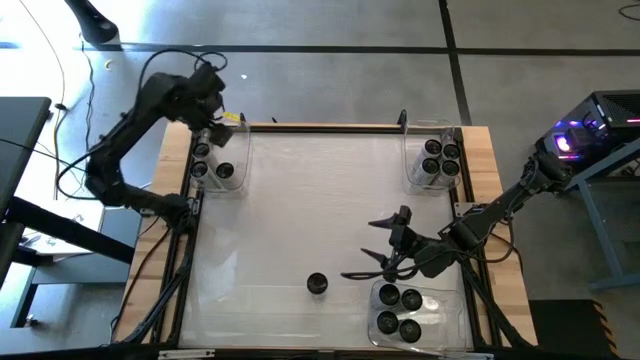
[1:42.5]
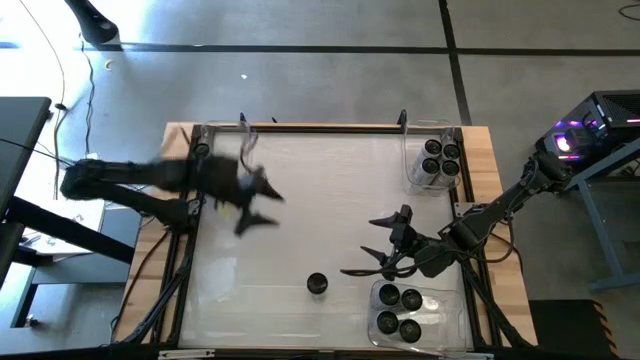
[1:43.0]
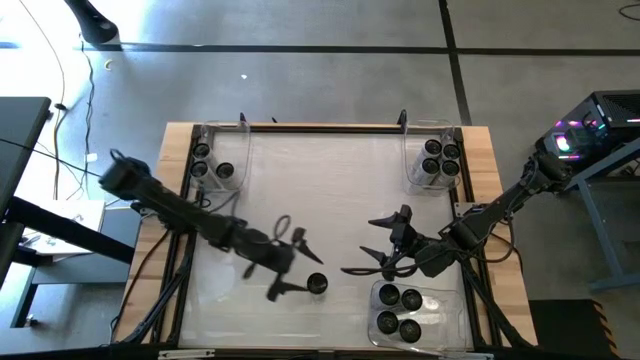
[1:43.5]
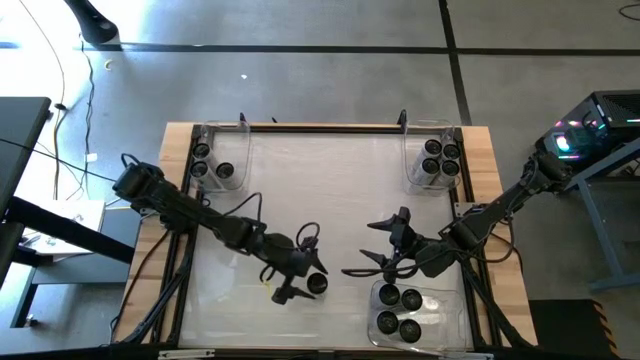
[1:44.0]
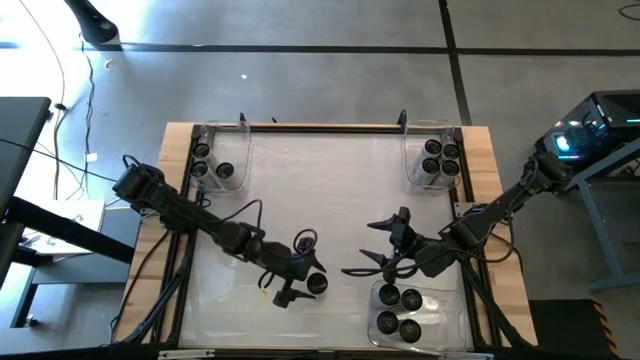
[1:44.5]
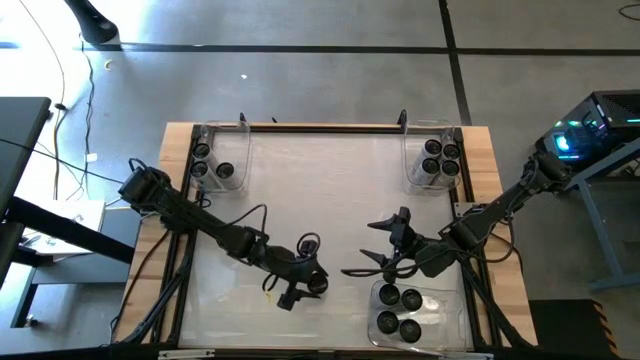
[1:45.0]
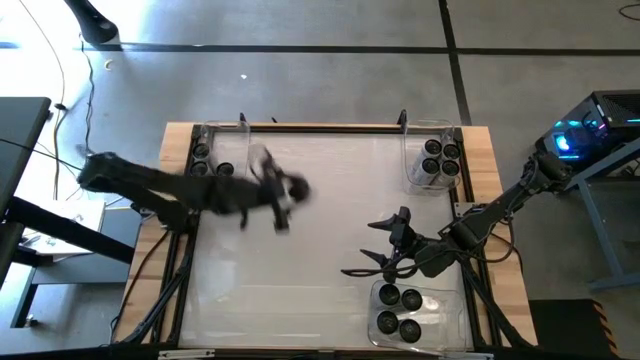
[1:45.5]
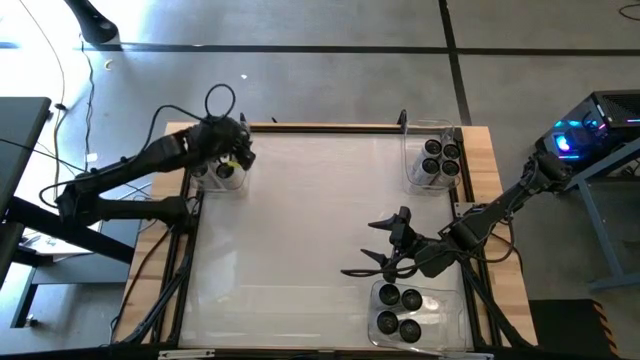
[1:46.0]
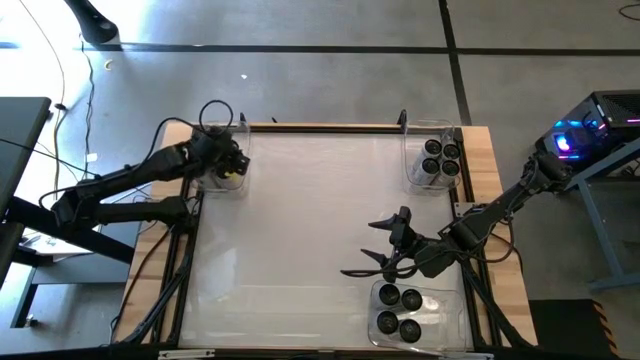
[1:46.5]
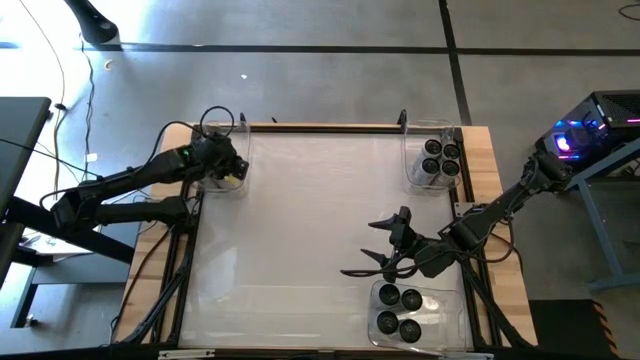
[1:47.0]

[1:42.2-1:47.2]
Task: Sort soda cans
Put the pink soda can into the top left transparent bin

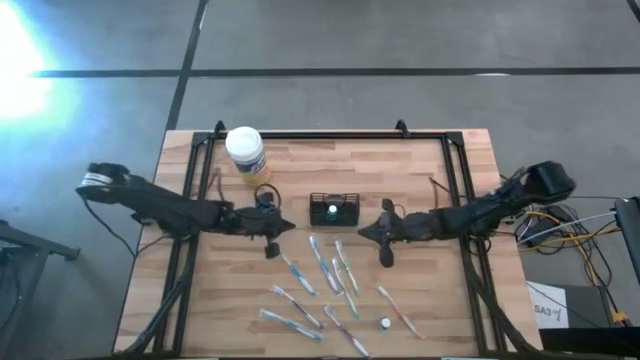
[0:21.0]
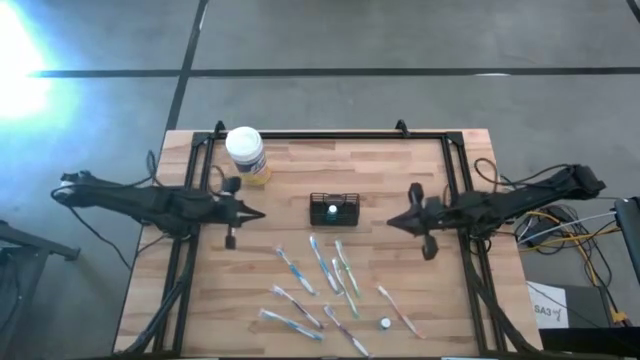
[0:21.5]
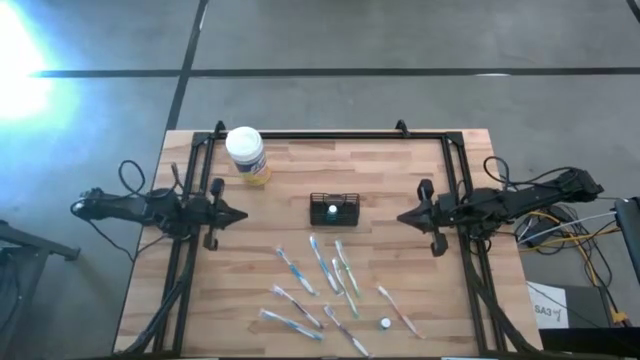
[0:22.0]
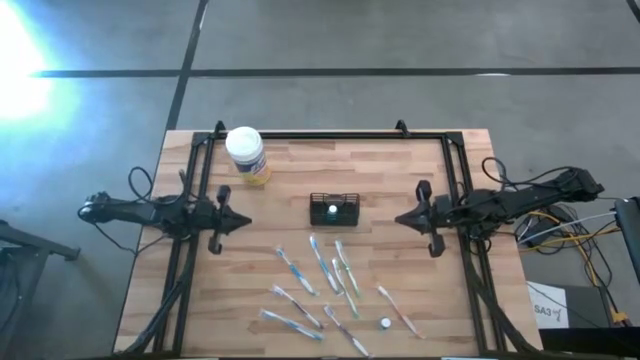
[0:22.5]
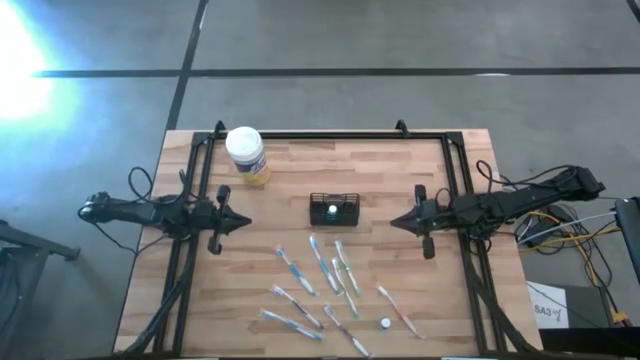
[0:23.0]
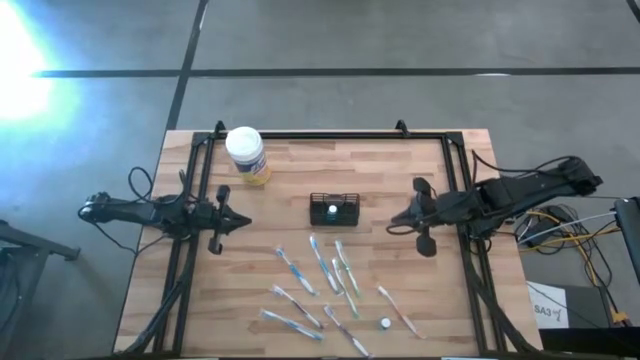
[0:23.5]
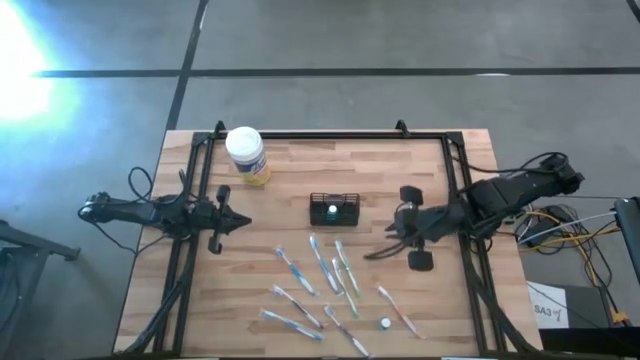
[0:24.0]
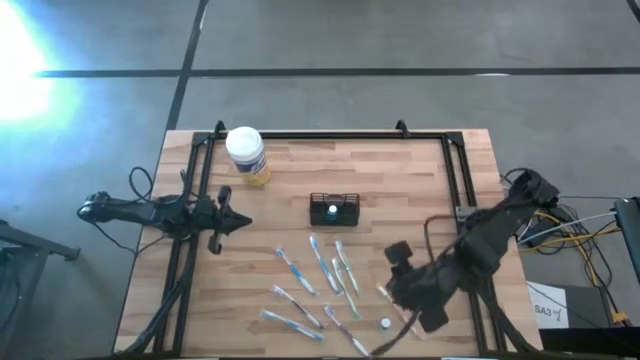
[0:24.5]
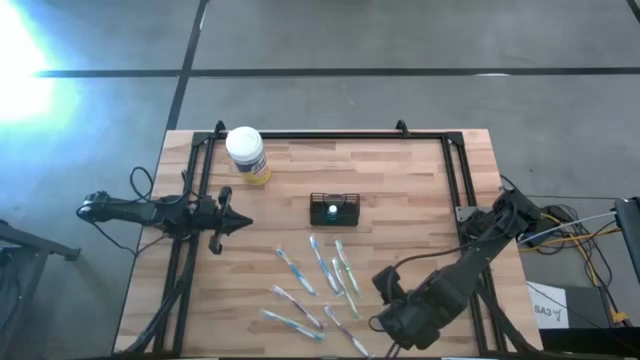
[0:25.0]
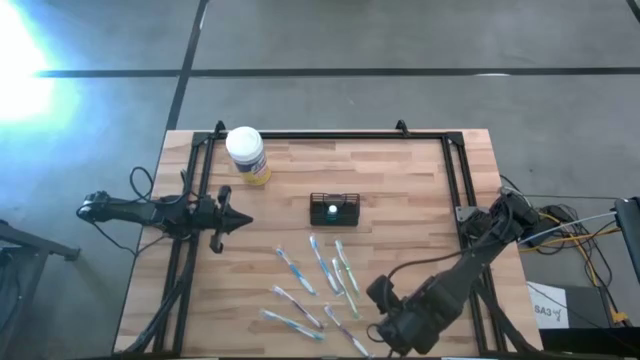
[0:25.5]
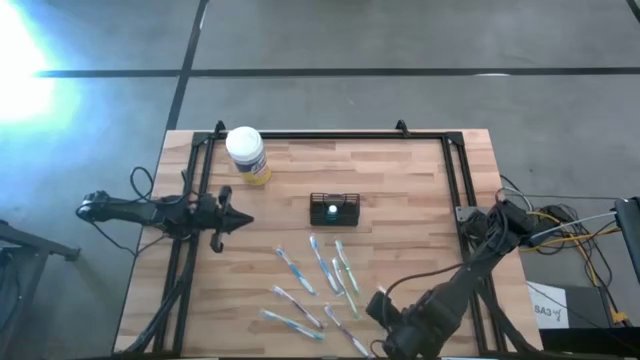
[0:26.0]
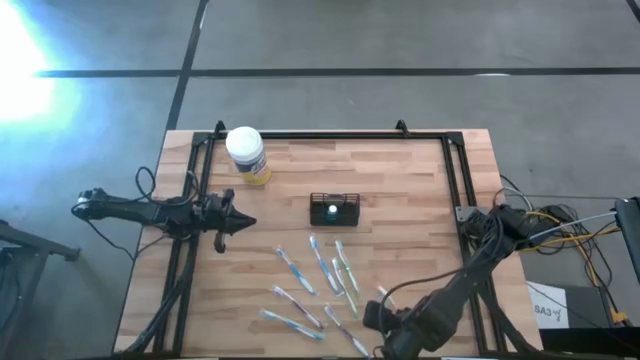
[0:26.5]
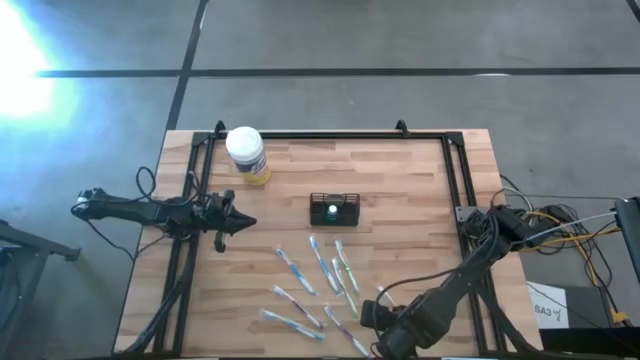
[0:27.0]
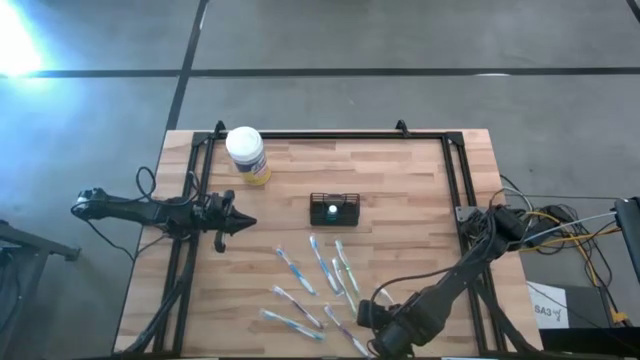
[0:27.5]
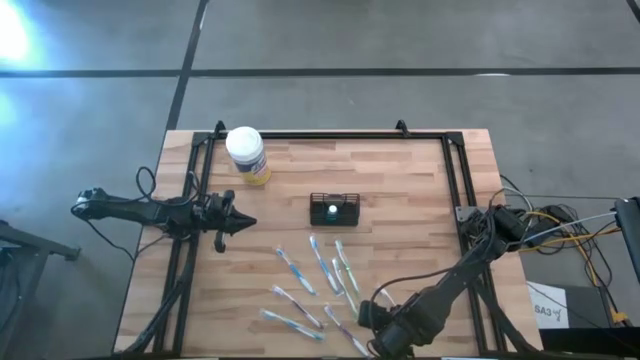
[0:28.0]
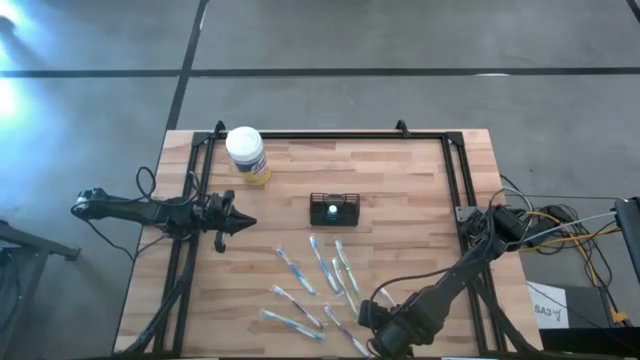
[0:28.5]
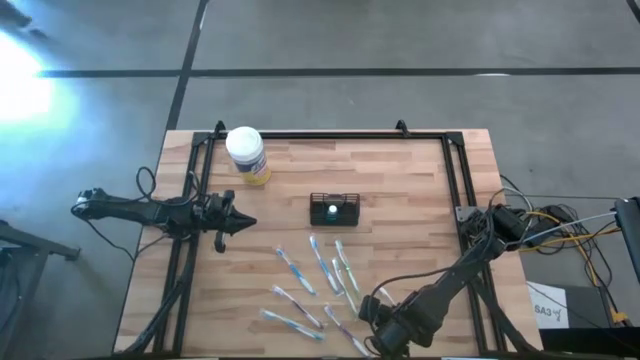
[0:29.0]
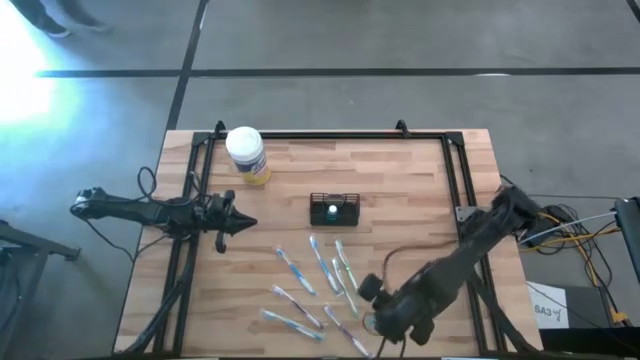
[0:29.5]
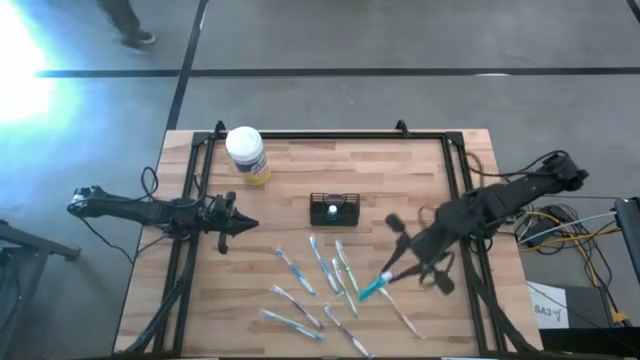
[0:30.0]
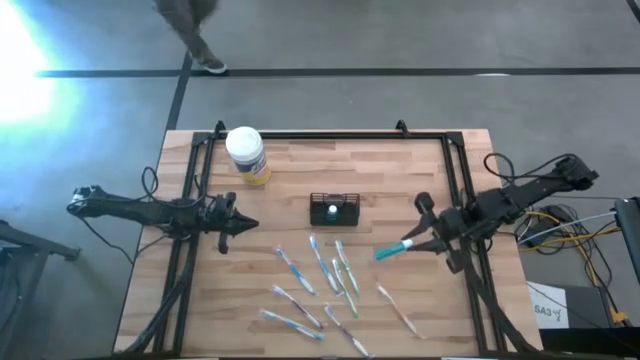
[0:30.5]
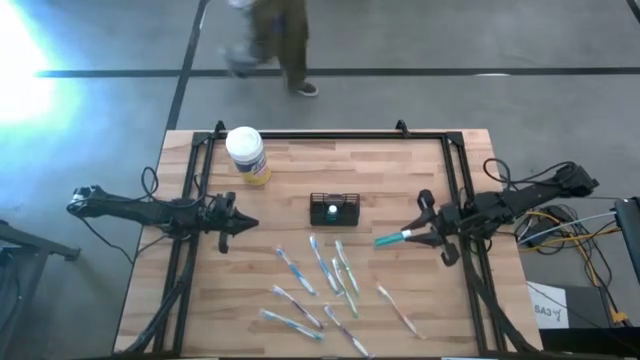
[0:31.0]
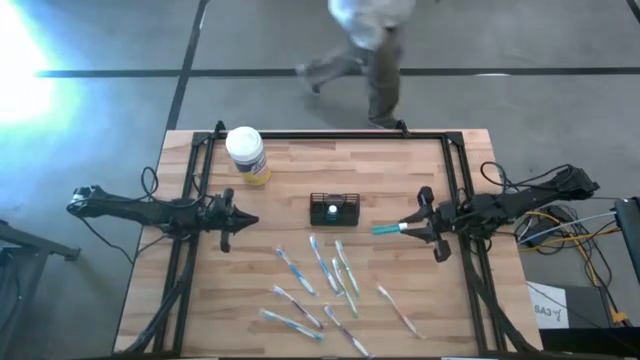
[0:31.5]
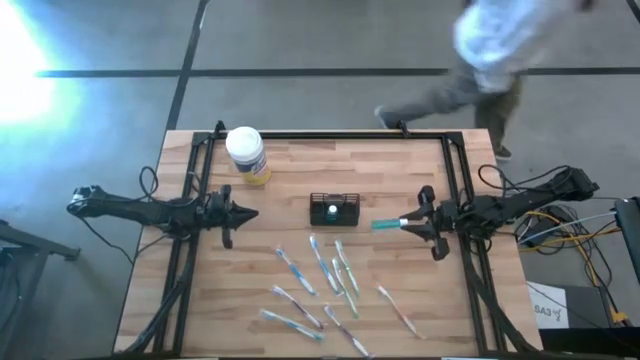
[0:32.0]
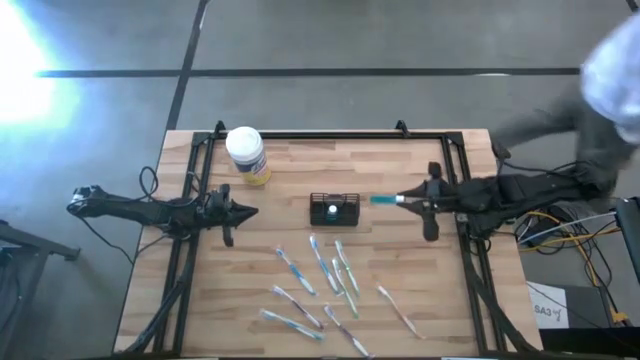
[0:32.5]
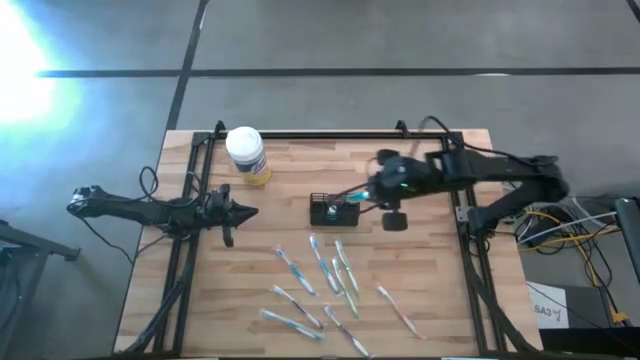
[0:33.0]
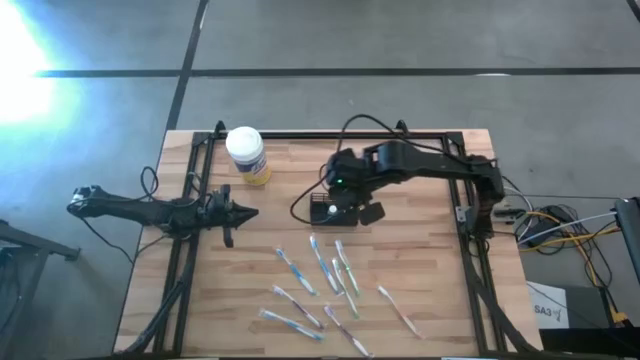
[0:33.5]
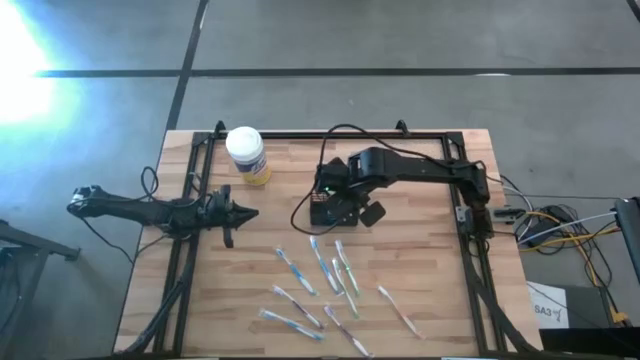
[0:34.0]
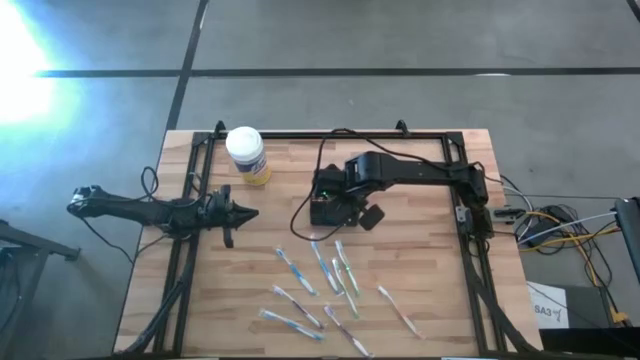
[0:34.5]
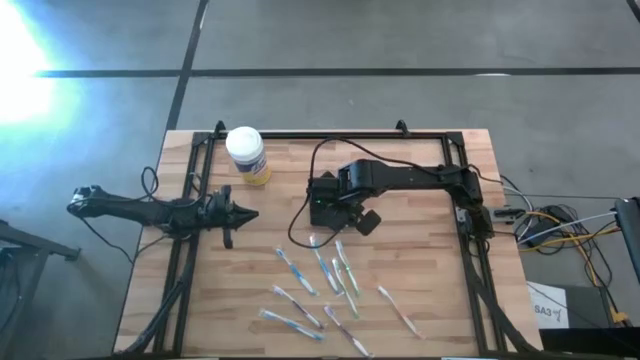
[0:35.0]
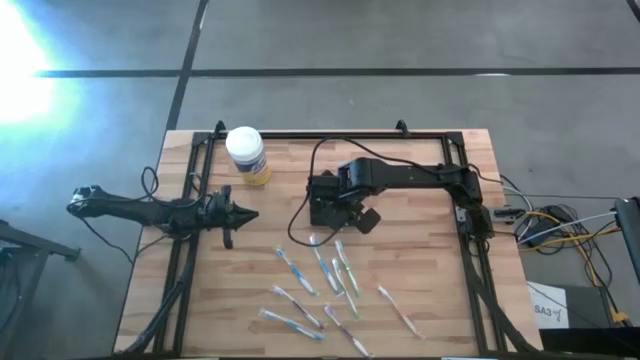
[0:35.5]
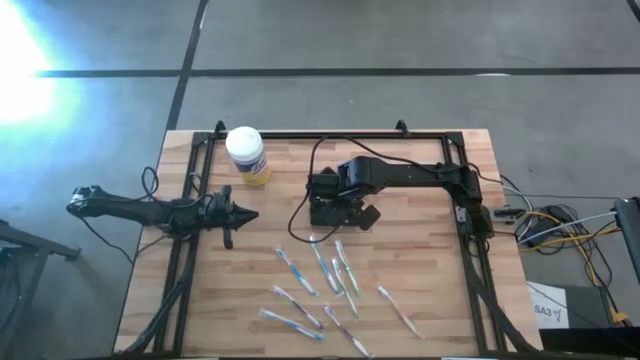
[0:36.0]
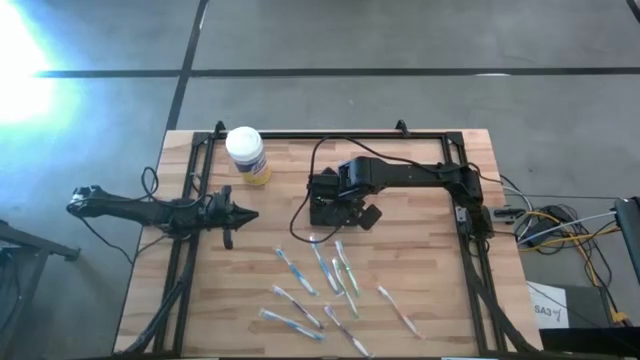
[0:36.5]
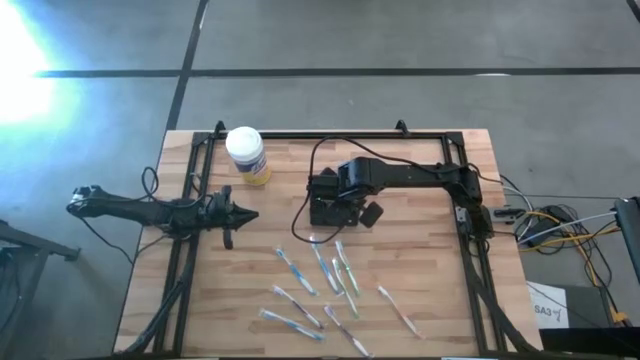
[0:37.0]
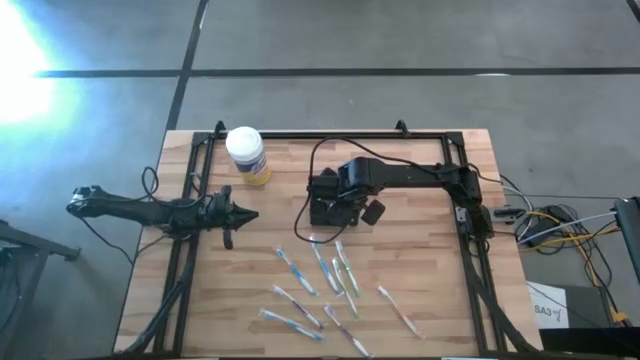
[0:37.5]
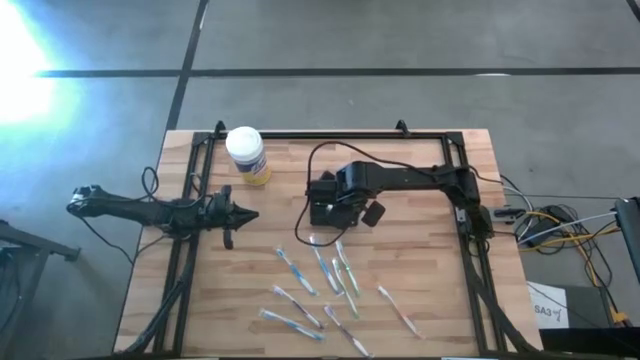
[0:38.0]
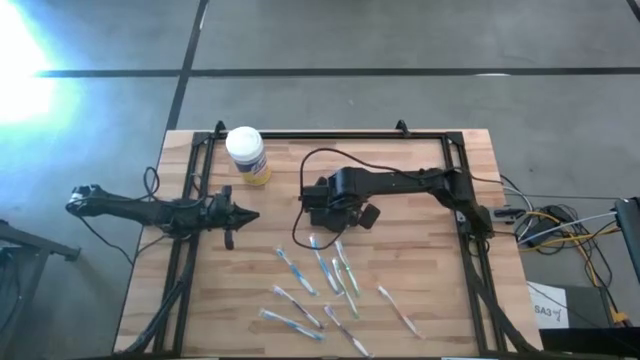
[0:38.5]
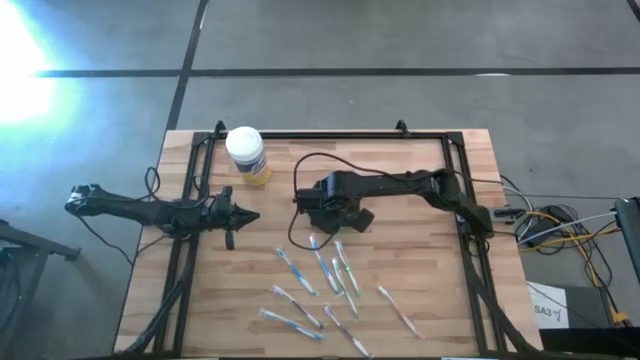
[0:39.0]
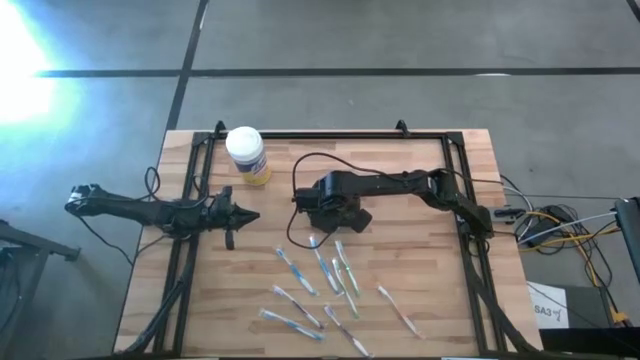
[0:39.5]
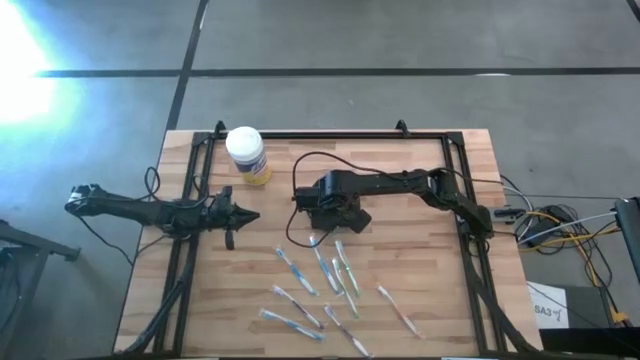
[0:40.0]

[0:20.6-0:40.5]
Task: Pick & Place toothbrushing station
Put the mouthwash into the black mesh organizer
